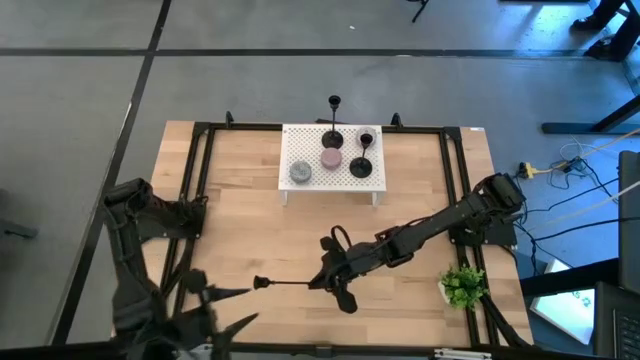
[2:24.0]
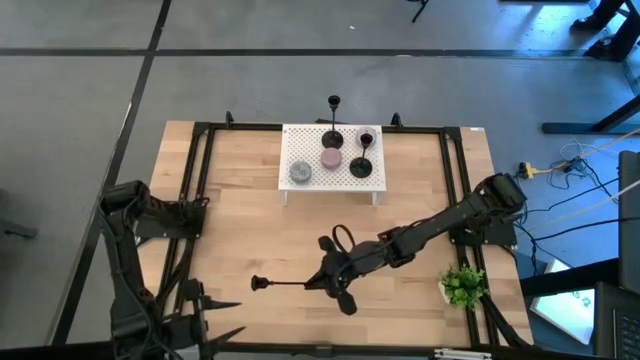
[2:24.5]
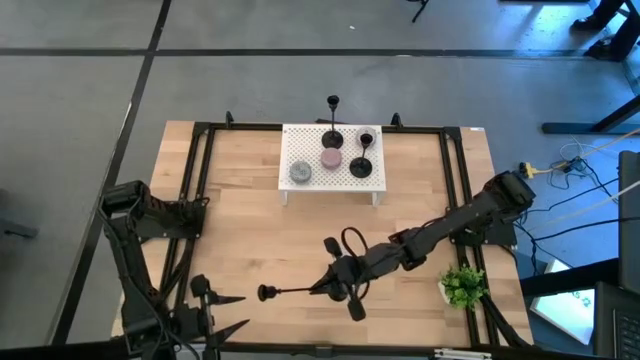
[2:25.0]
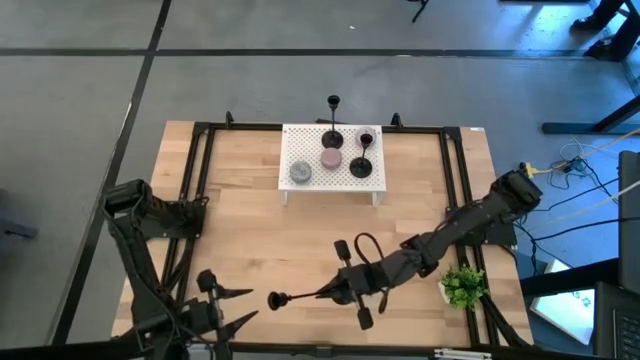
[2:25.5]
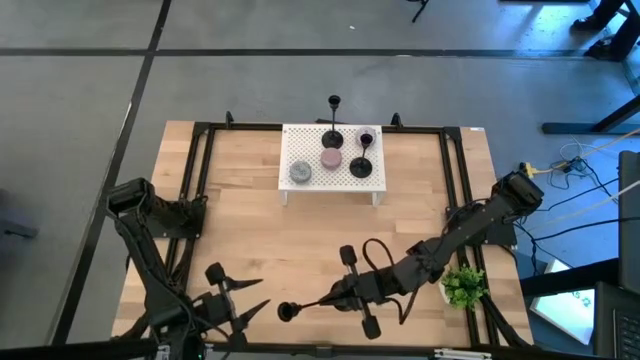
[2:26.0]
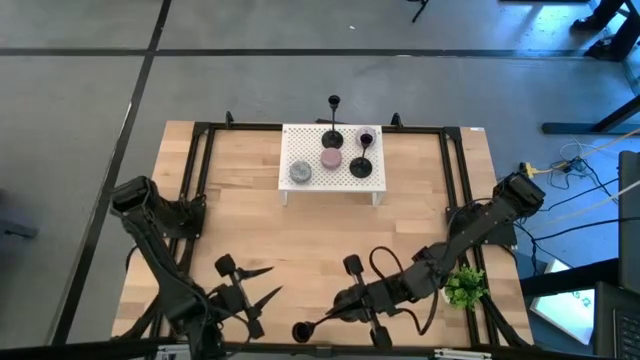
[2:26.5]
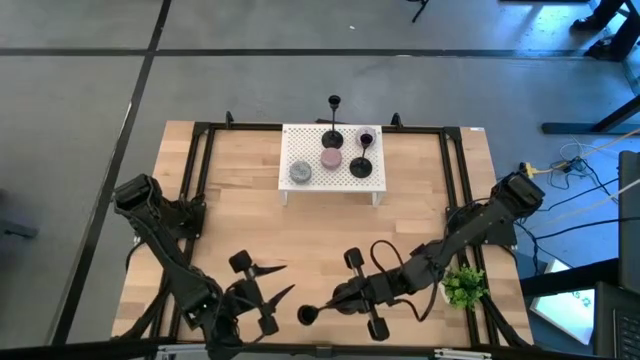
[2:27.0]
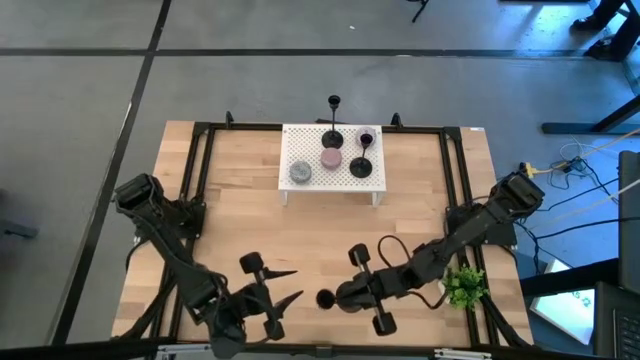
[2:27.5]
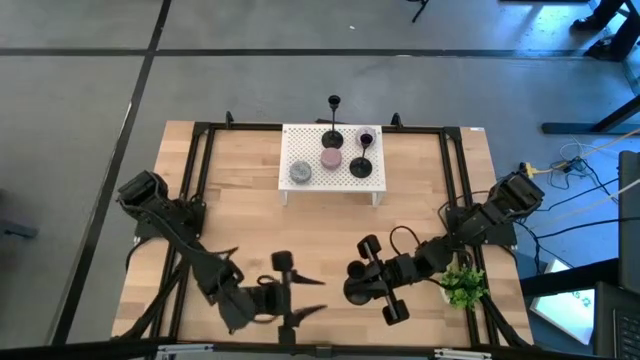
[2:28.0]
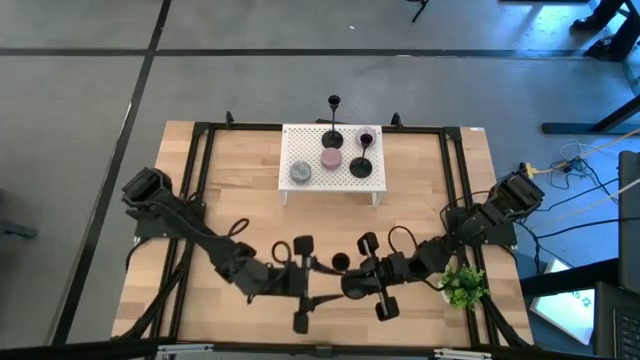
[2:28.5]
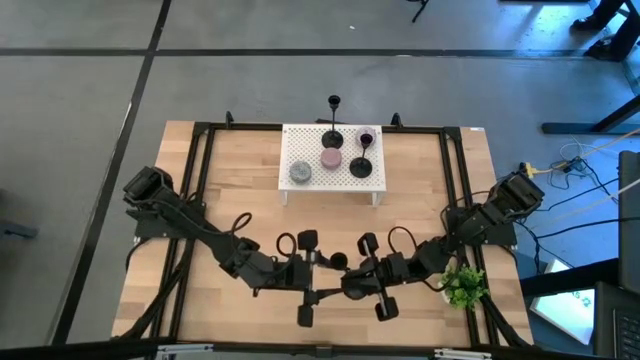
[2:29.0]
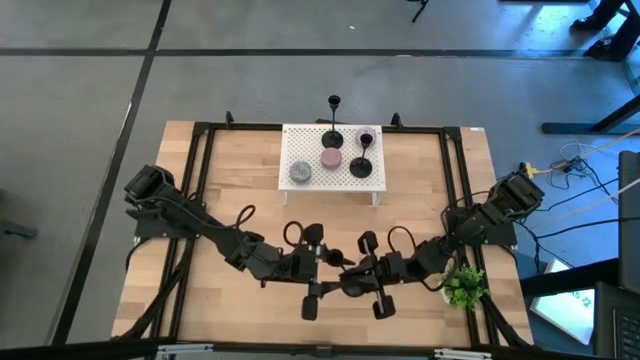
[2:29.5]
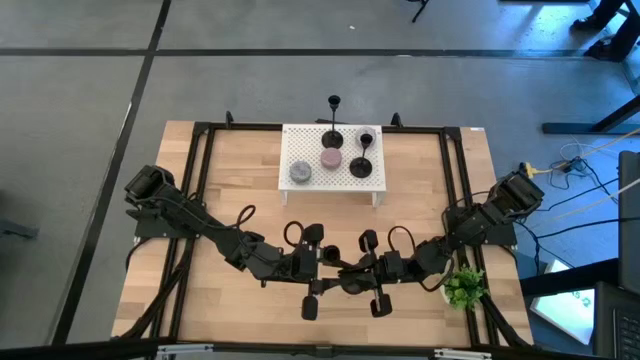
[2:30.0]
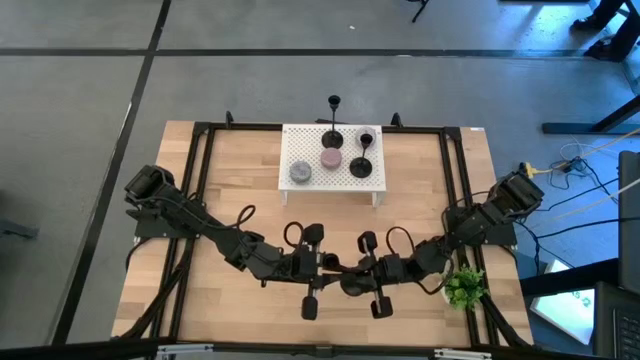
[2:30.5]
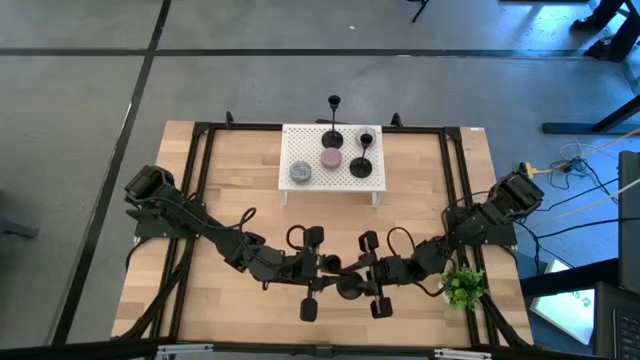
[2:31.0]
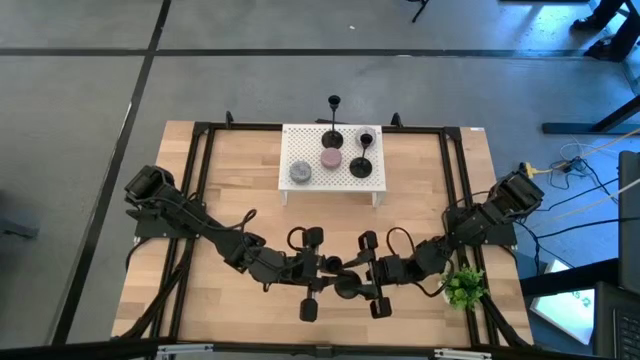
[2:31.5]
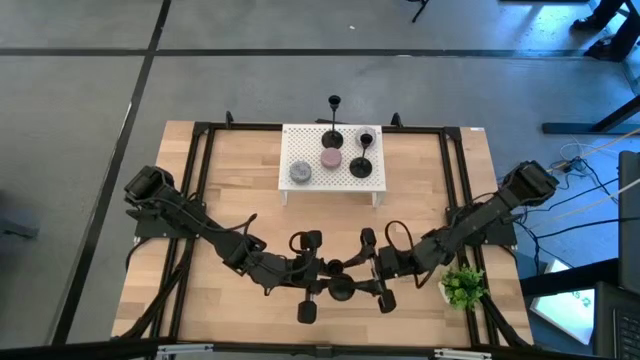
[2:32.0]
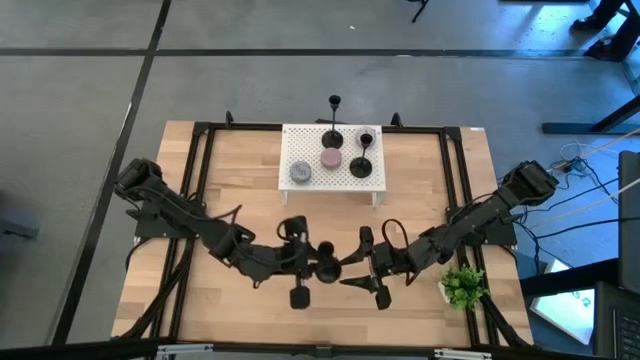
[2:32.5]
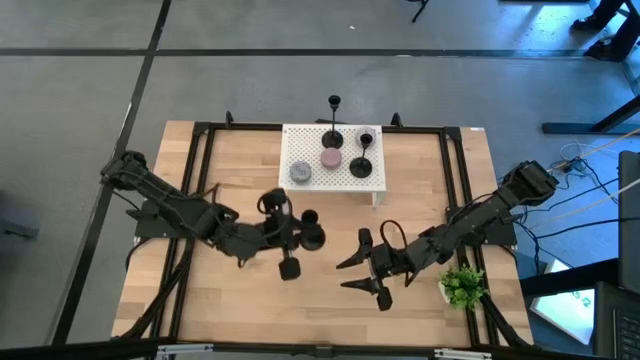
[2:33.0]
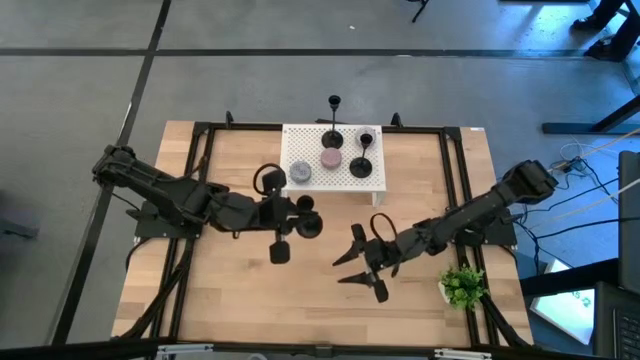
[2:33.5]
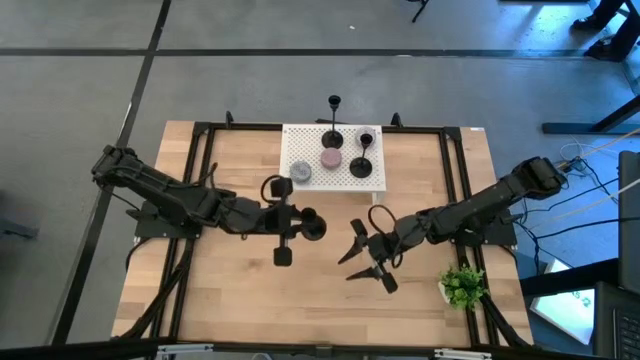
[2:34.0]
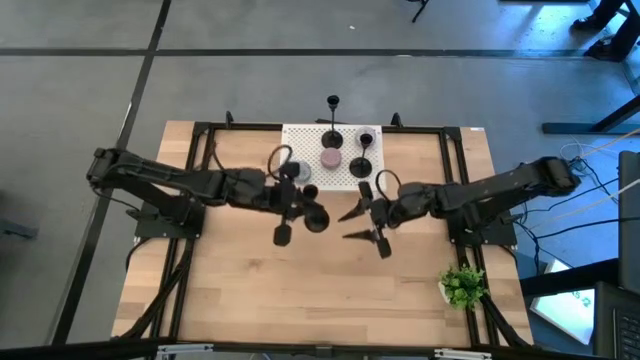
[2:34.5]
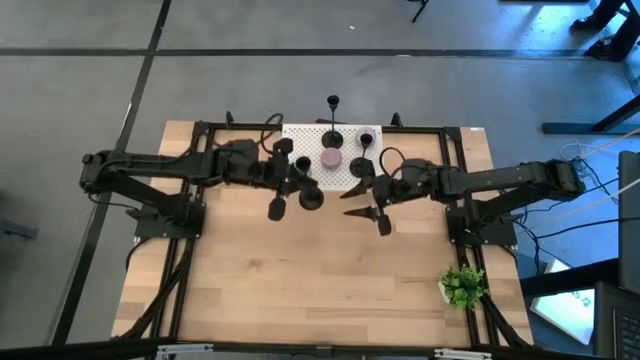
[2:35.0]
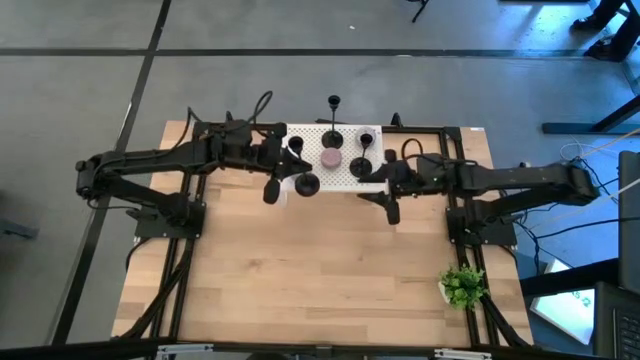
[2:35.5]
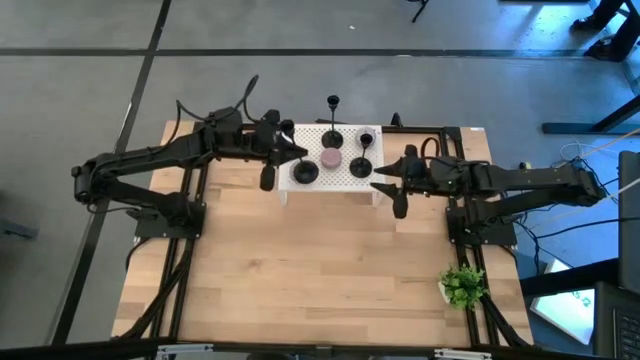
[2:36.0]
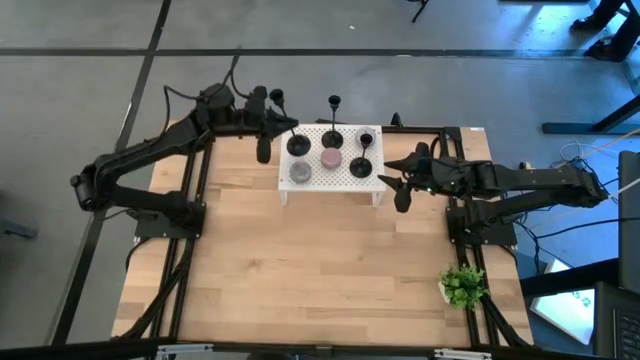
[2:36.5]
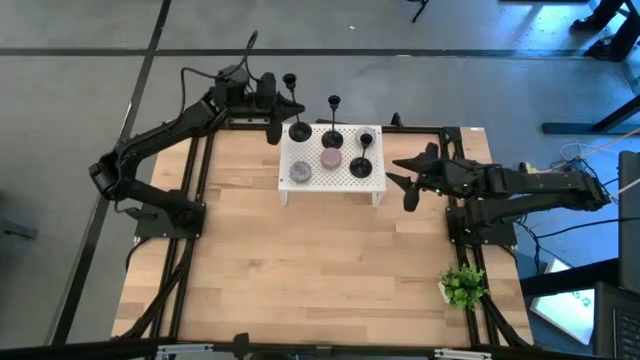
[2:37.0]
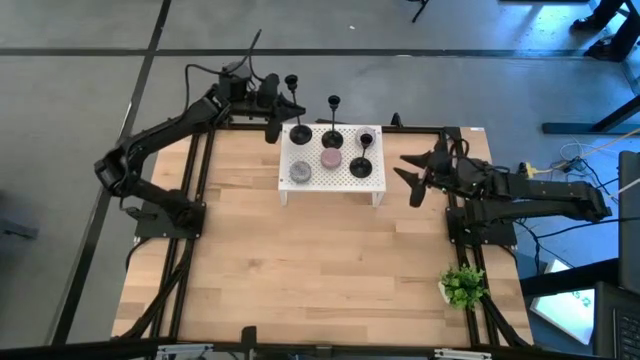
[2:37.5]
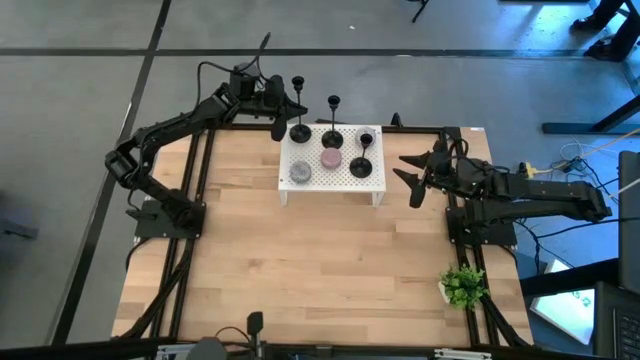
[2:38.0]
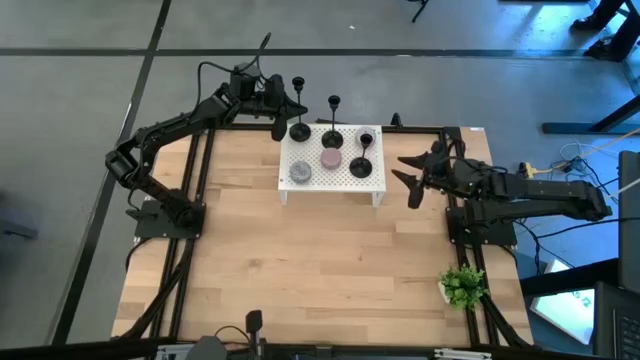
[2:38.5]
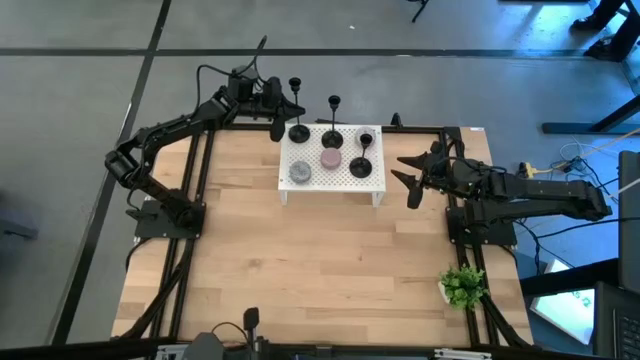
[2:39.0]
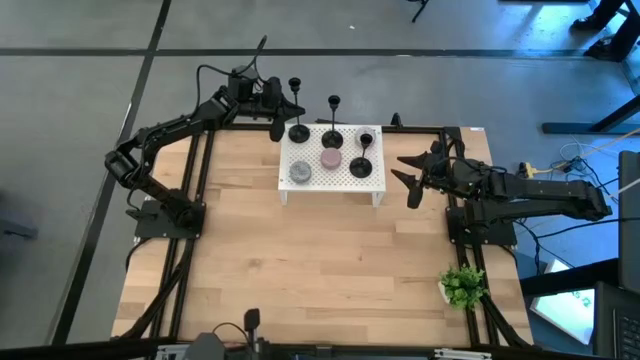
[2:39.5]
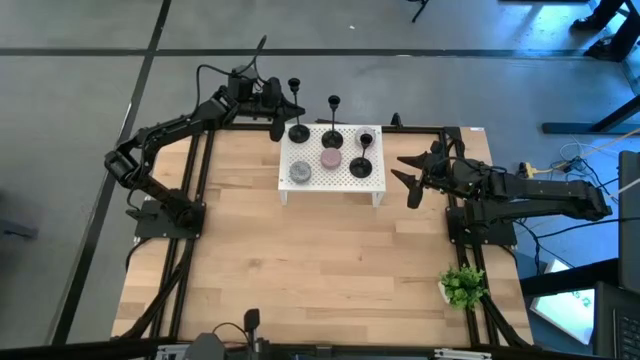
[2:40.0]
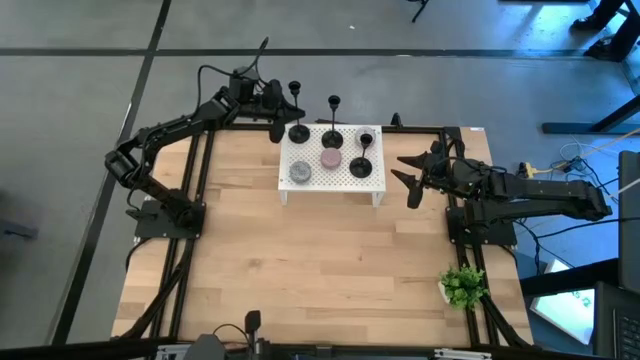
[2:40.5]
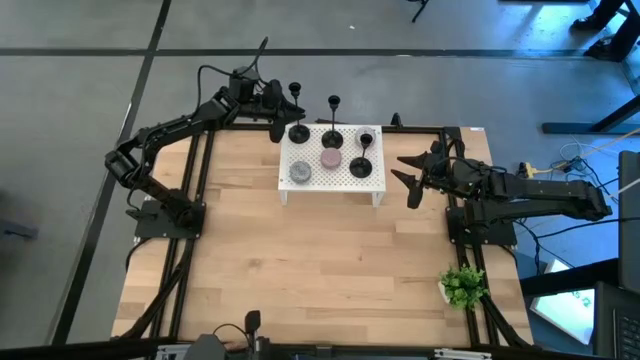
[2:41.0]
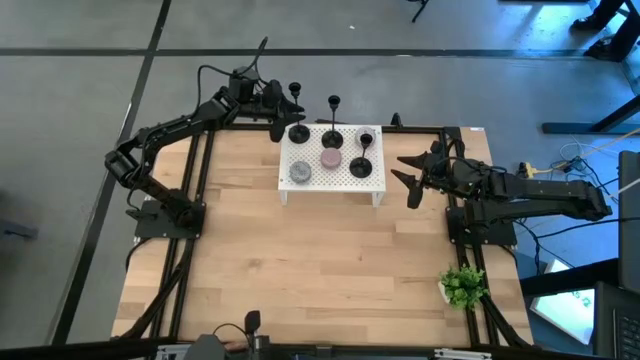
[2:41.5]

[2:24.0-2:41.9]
Task: Pick & Place candle stick holders
Put the black candle holder on the shelf

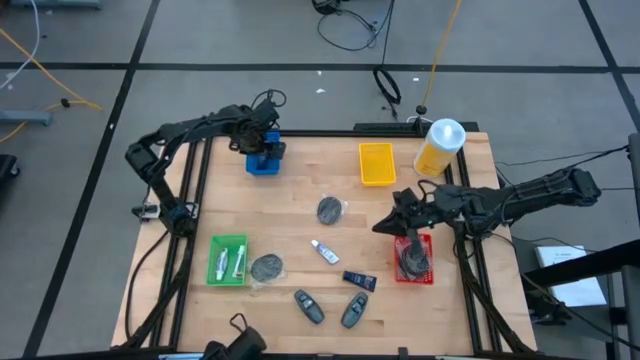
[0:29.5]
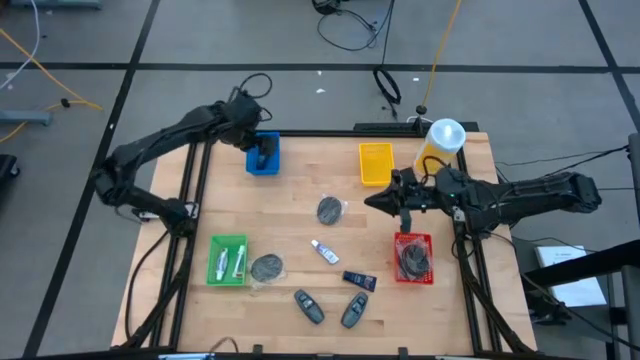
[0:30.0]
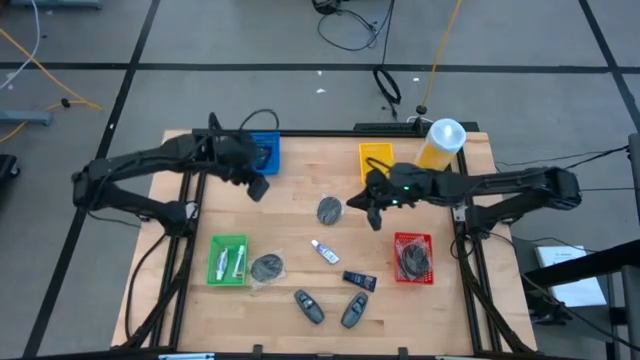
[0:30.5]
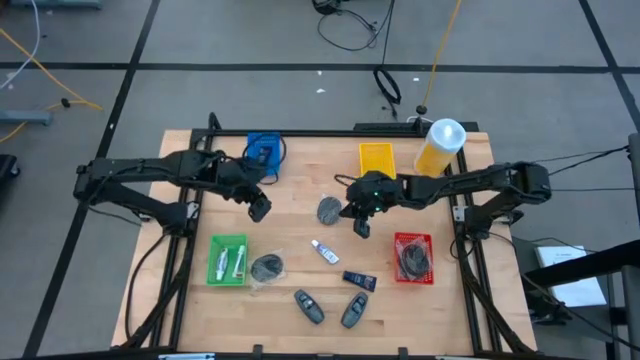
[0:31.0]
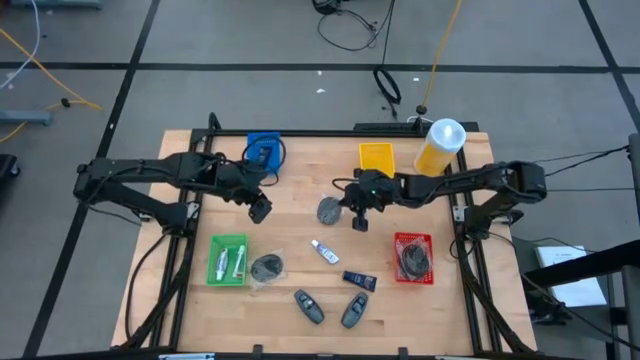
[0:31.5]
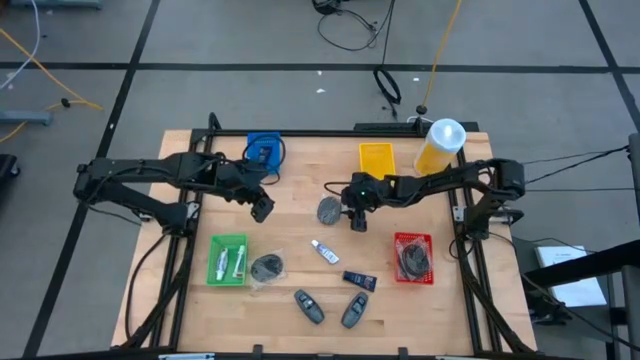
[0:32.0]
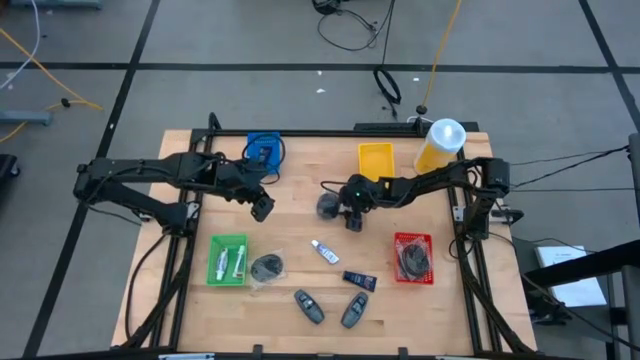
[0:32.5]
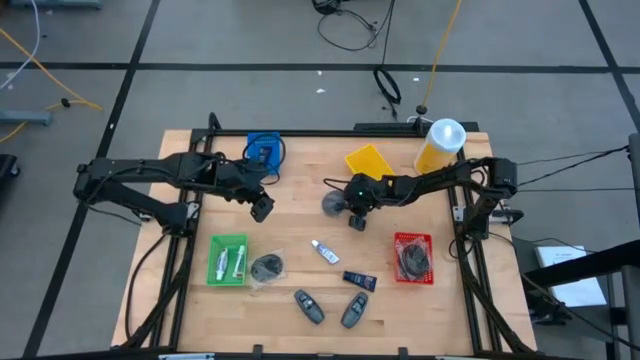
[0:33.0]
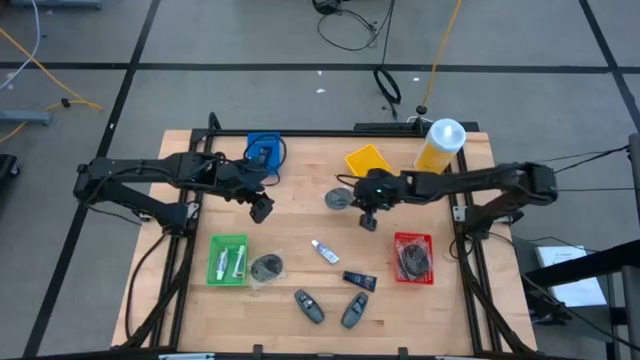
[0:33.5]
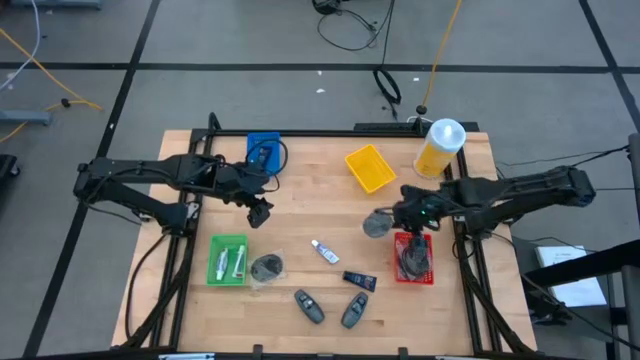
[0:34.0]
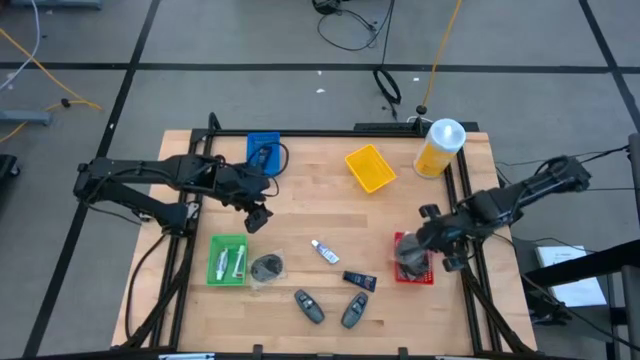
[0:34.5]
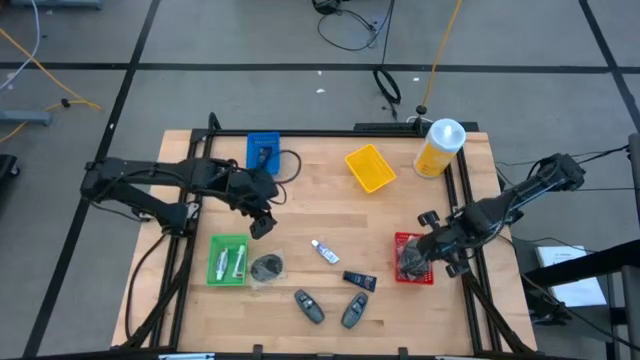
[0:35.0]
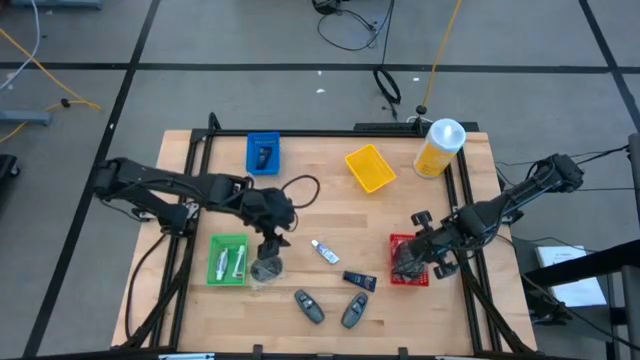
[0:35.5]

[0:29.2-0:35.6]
Task: Pick & Place Travel size toiletries
Put the black hairbrush into the red bin
